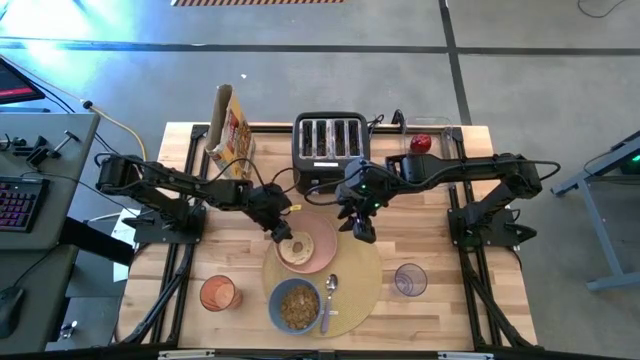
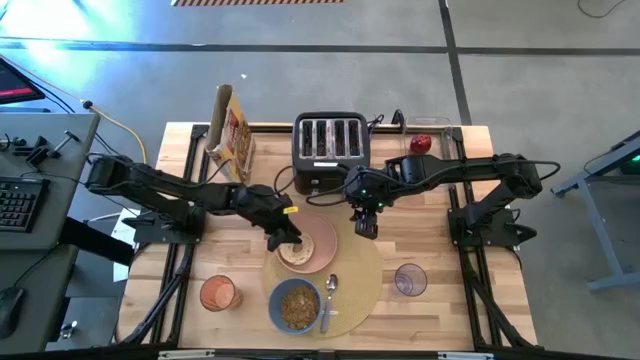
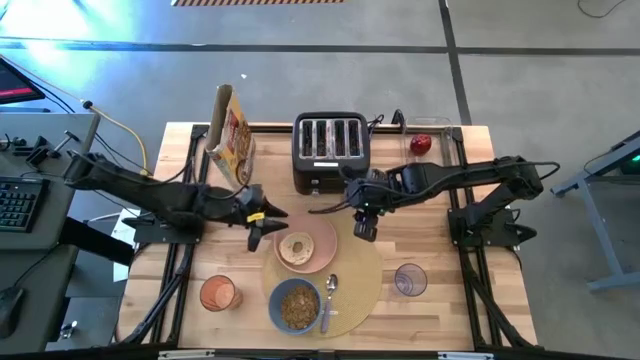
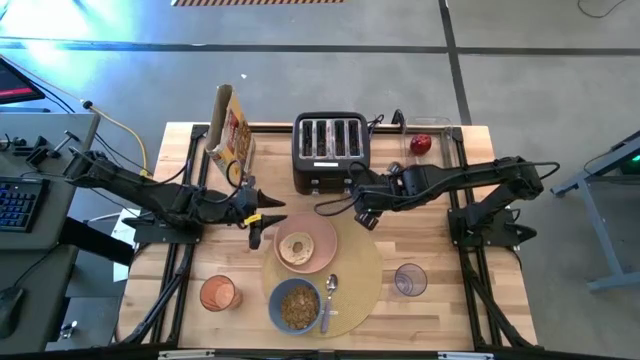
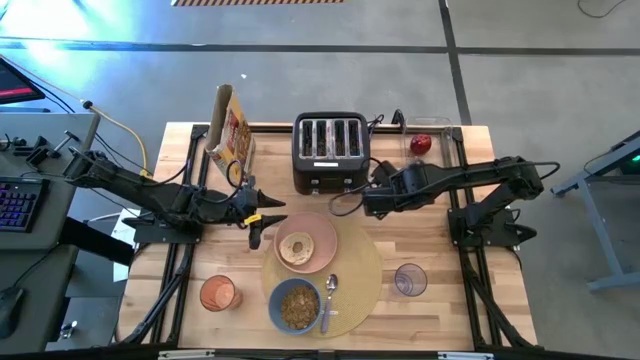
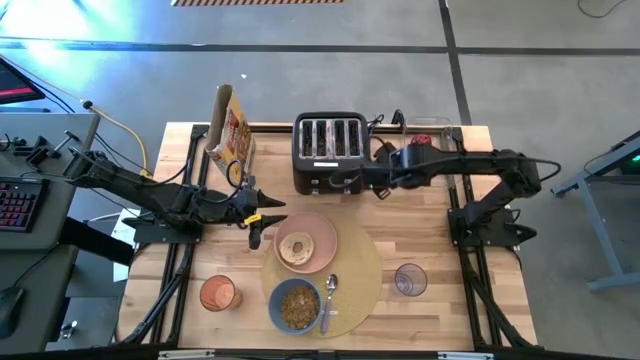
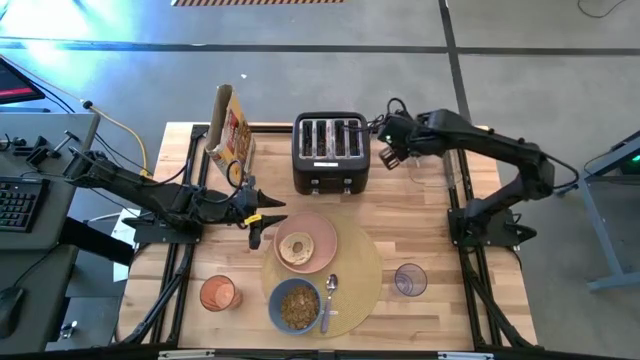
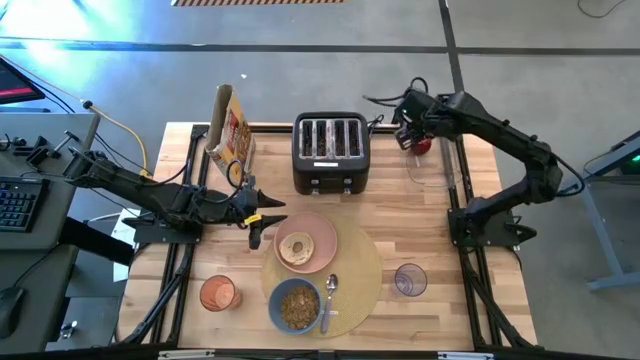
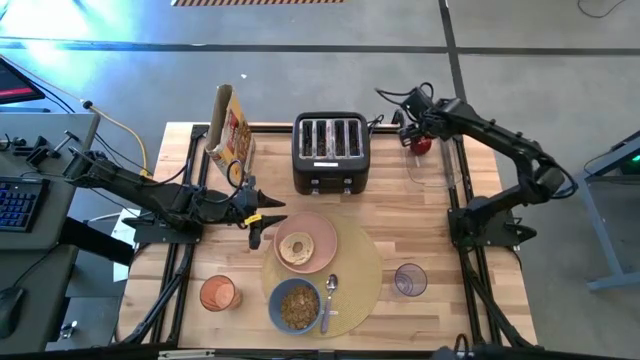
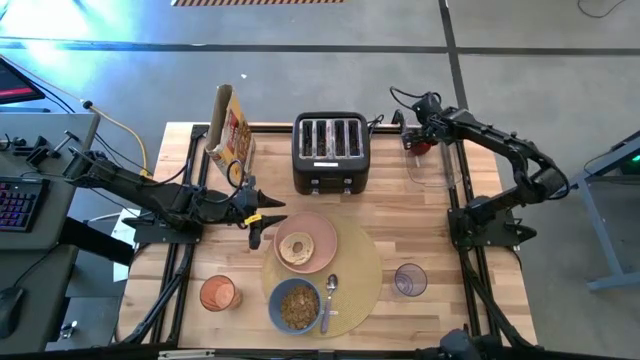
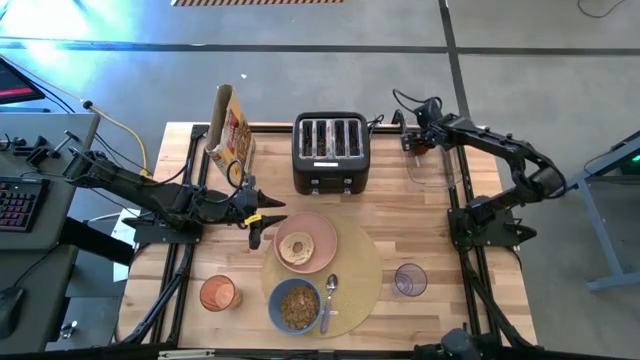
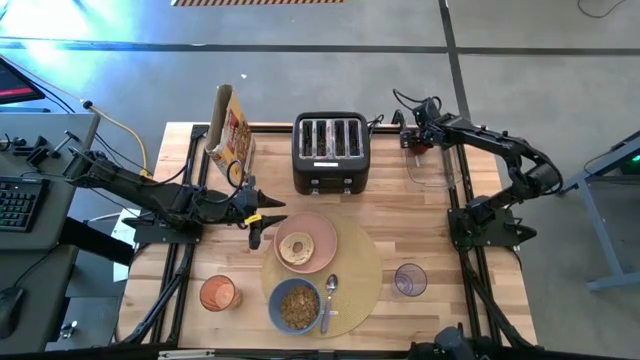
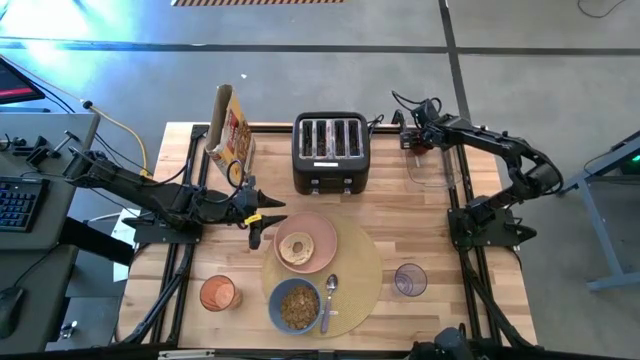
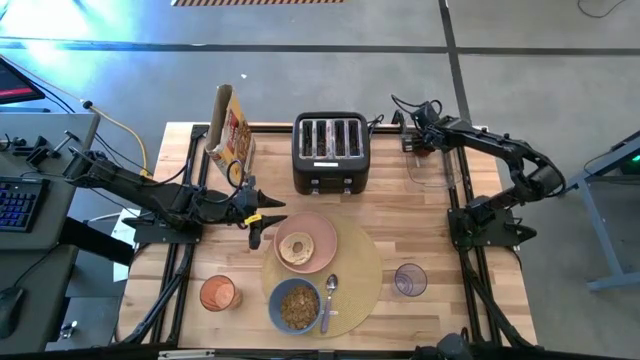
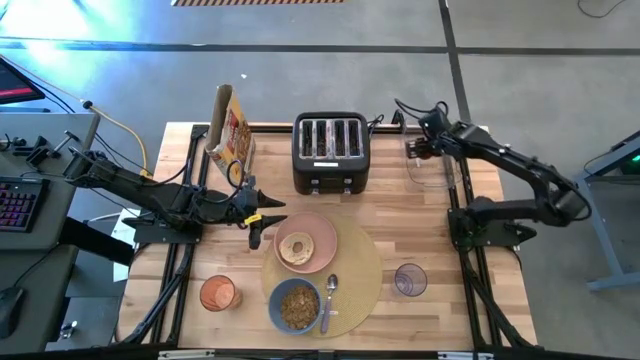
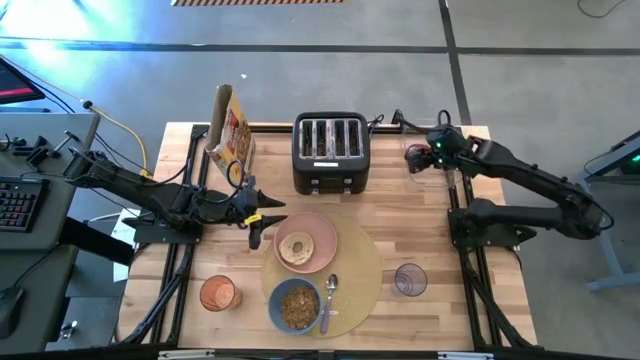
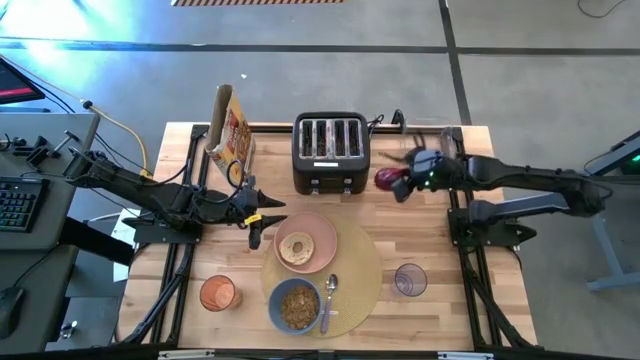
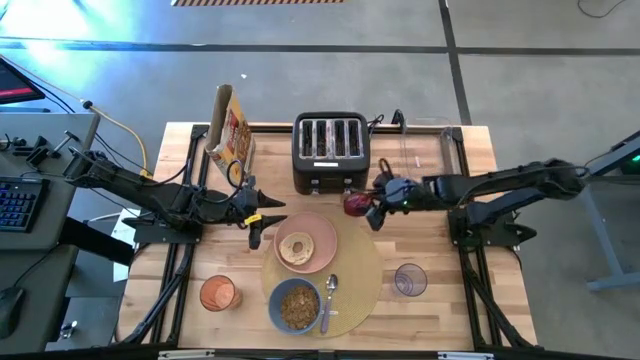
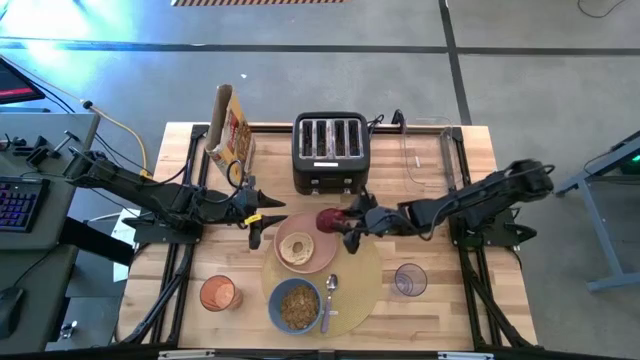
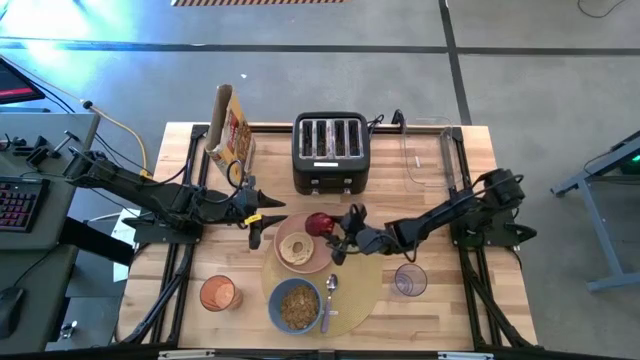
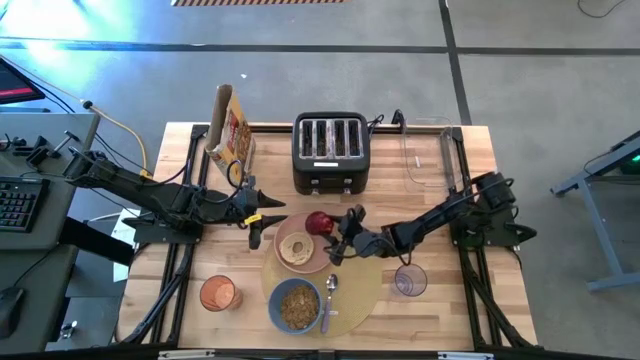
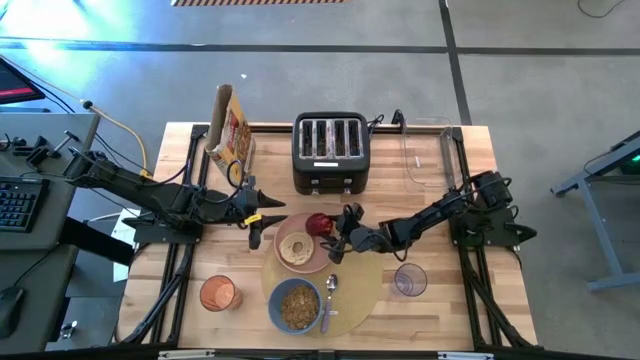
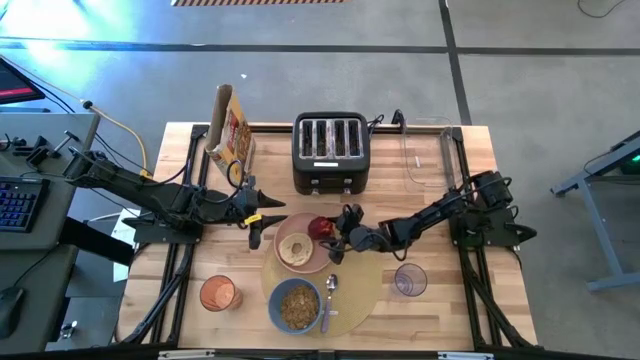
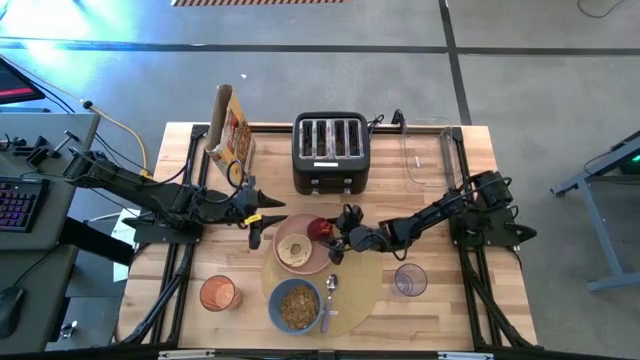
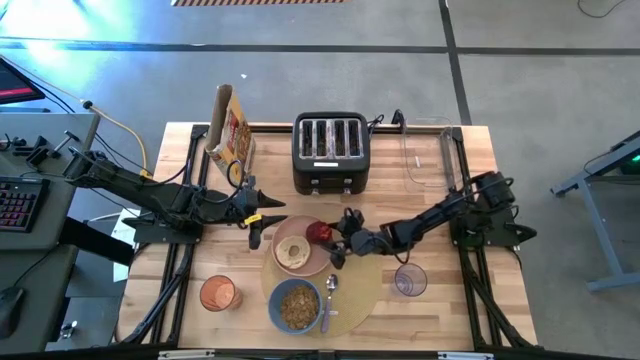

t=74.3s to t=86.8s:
Task: Arrange a breakfast setting
Put the red apple on the plate

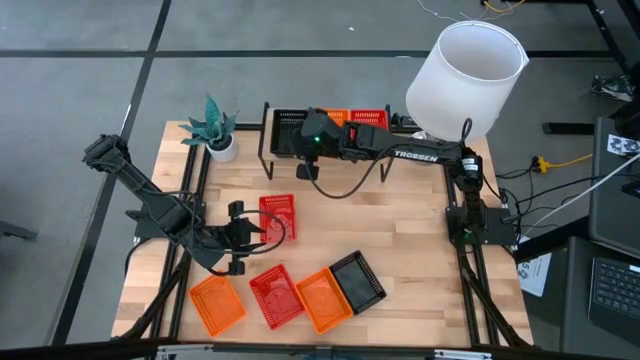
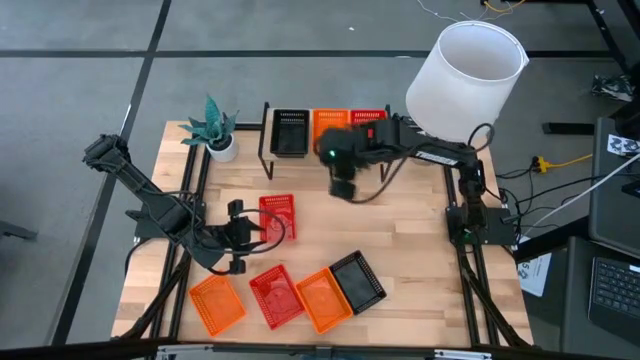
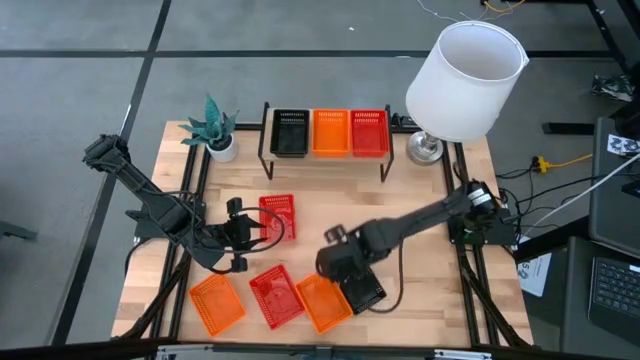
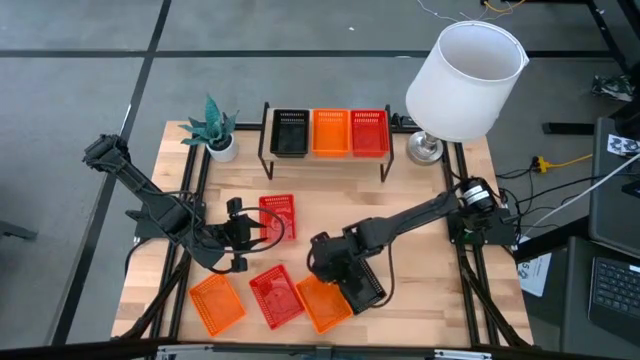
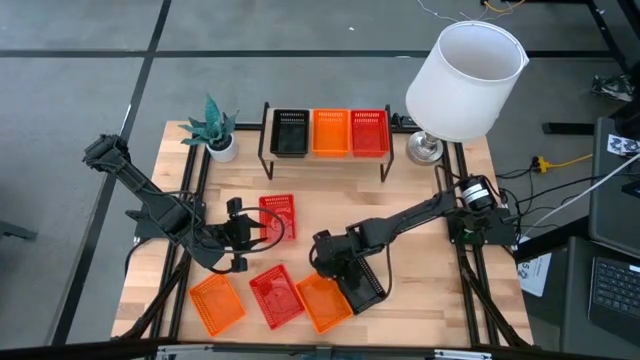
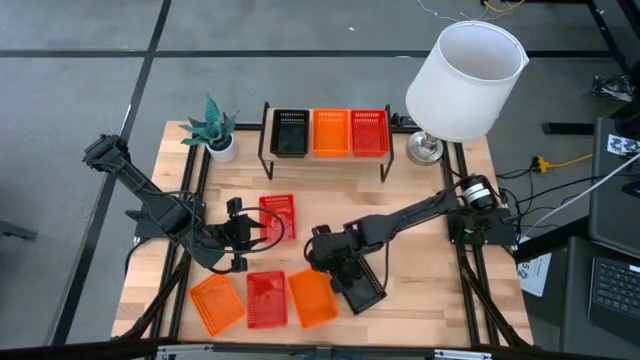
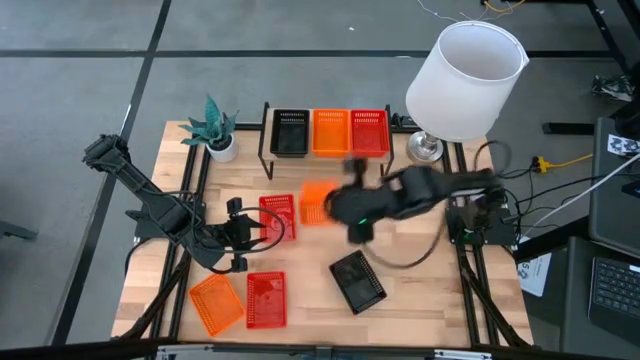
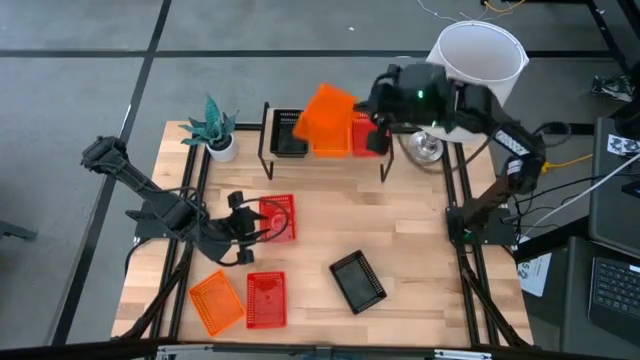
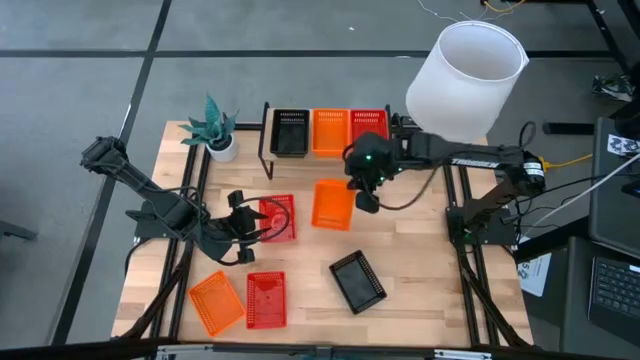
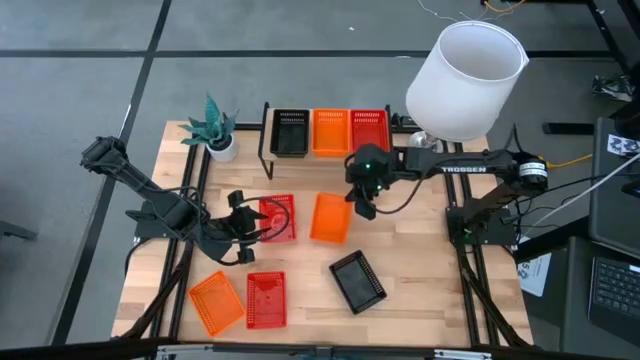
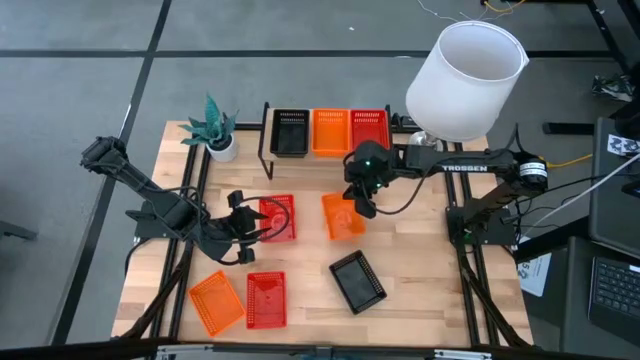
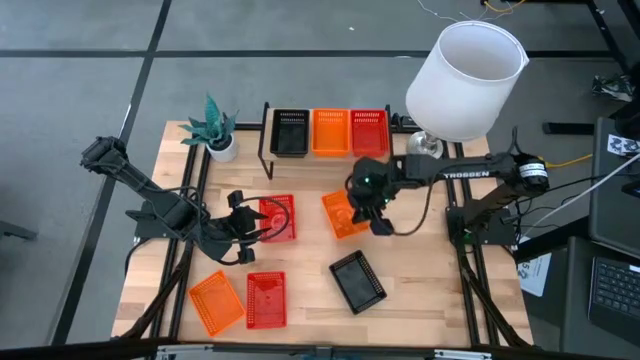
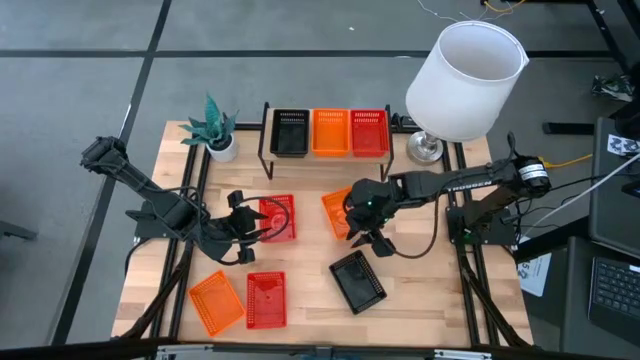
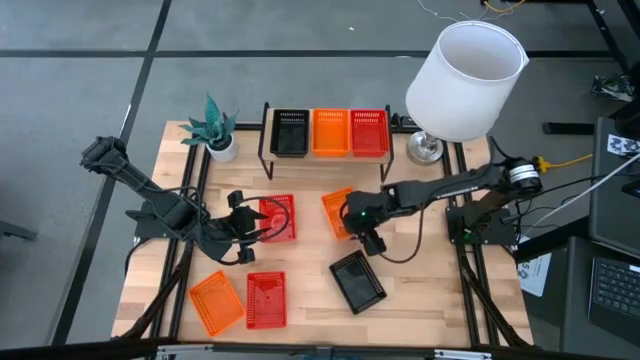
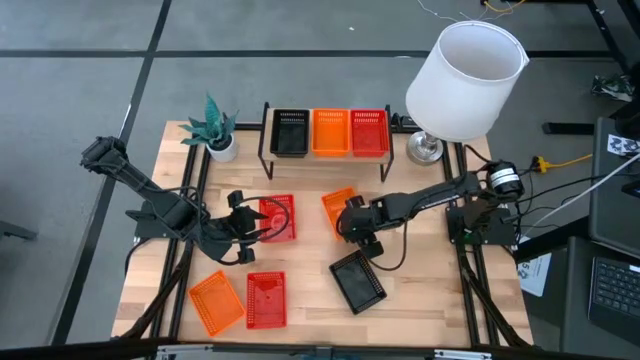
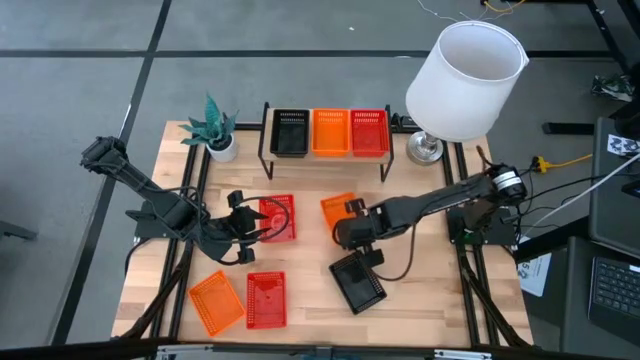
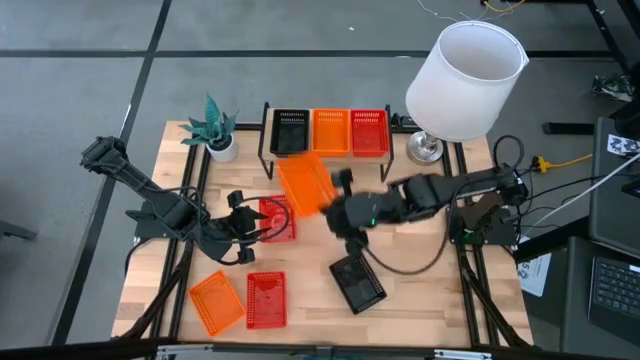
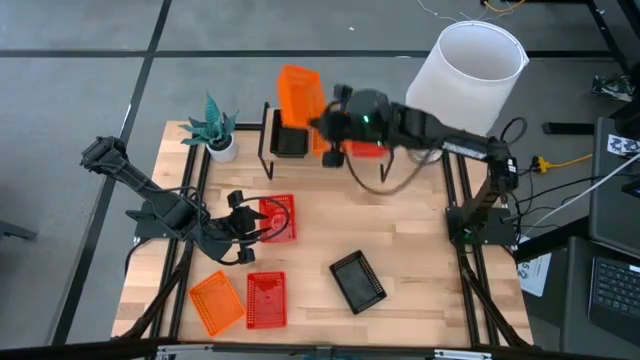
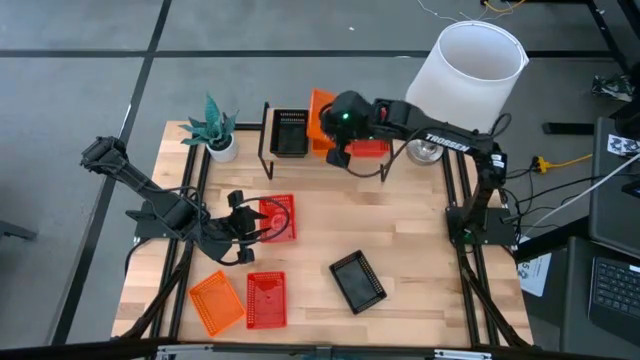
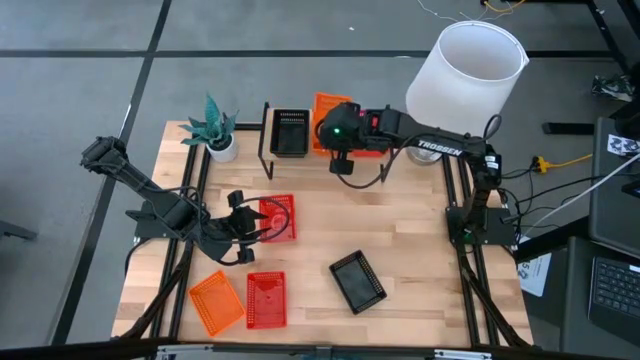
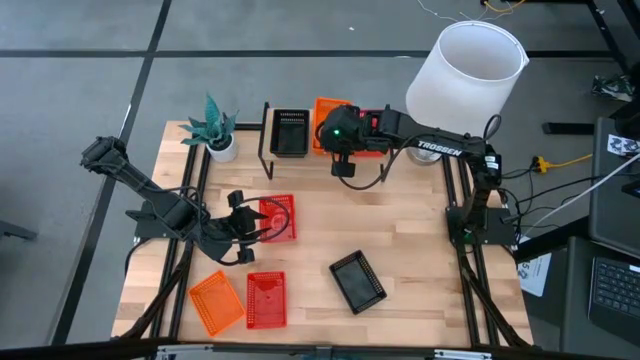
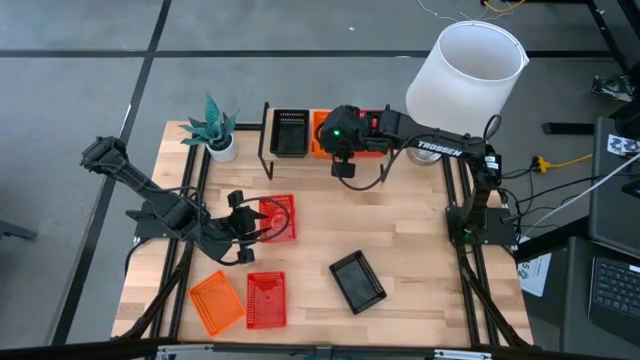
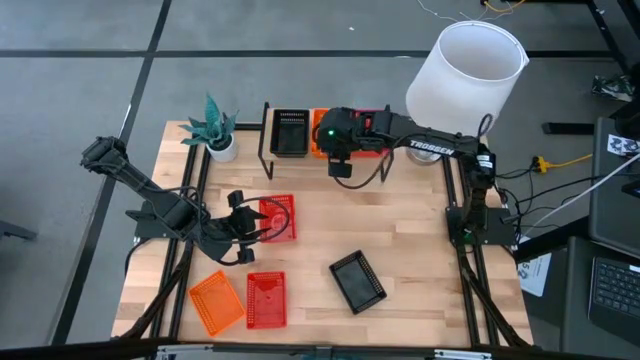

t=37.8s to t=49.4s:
Task: Stack baskets on shelf by color
Stack the right orange bin on top of the orange bin on the shelf
